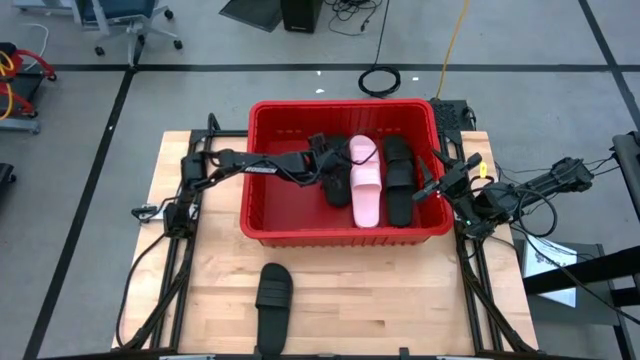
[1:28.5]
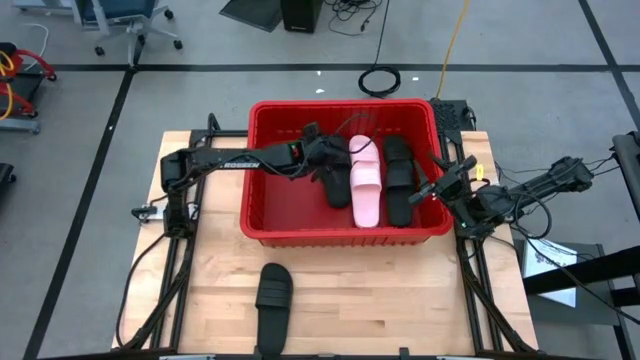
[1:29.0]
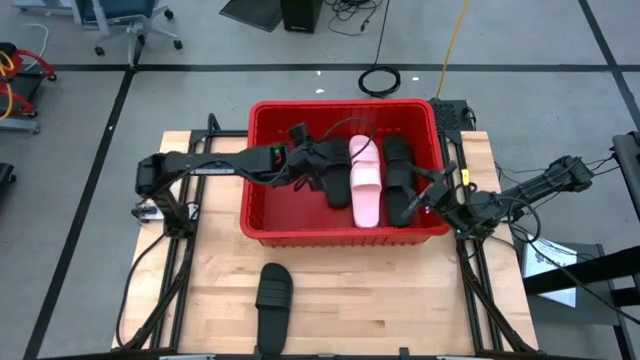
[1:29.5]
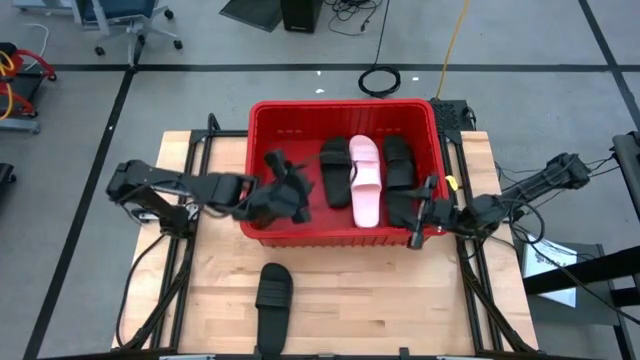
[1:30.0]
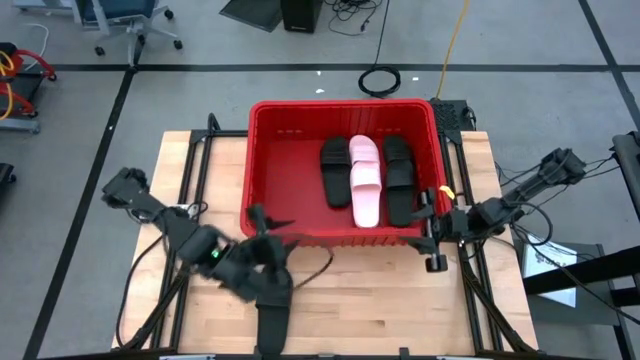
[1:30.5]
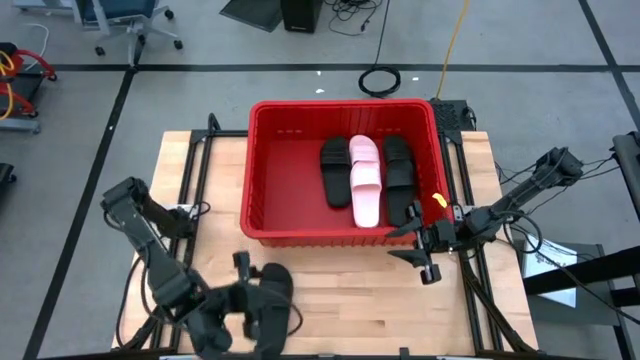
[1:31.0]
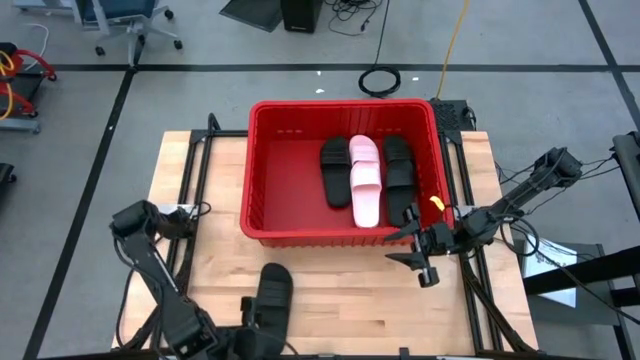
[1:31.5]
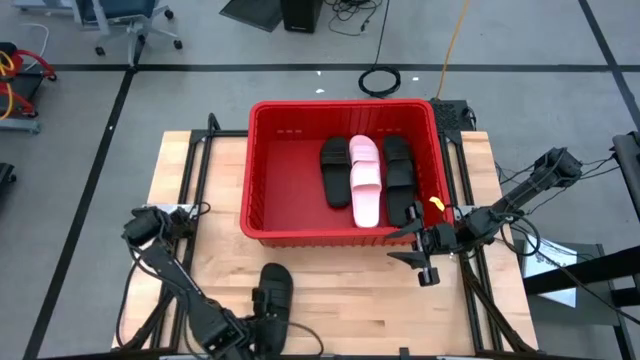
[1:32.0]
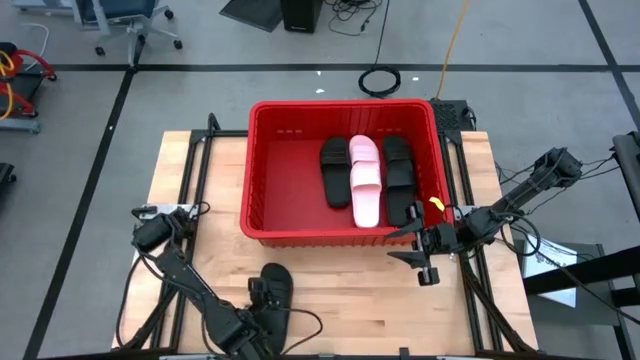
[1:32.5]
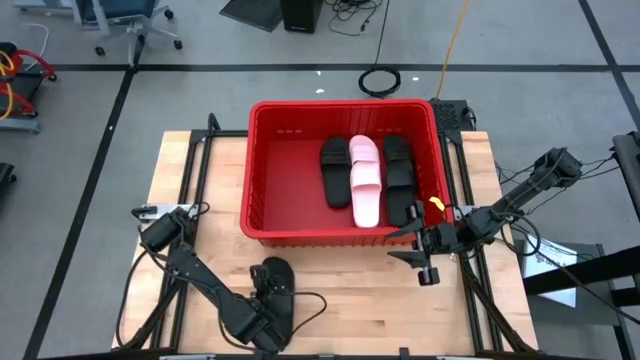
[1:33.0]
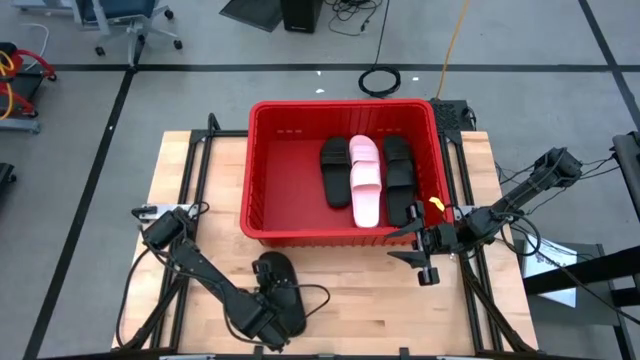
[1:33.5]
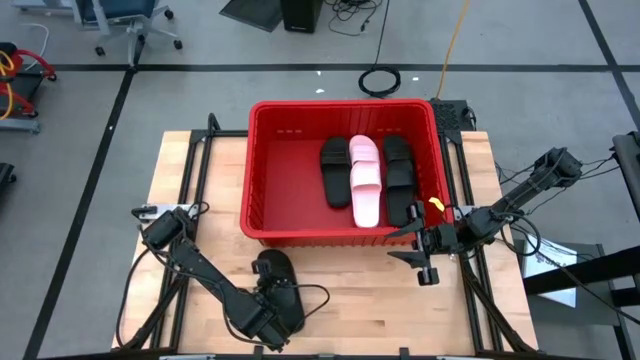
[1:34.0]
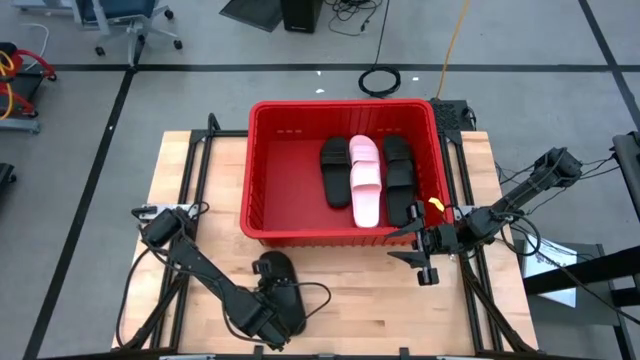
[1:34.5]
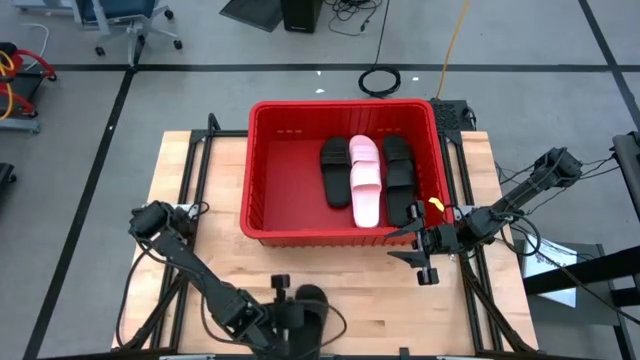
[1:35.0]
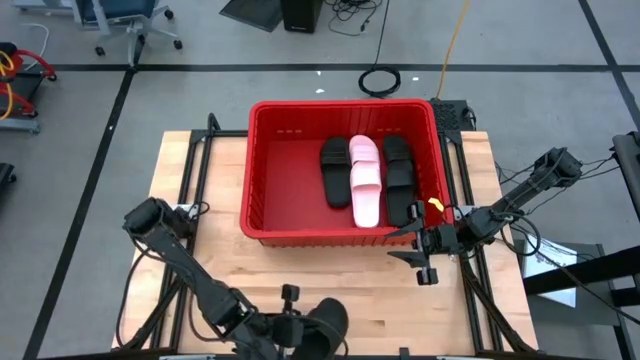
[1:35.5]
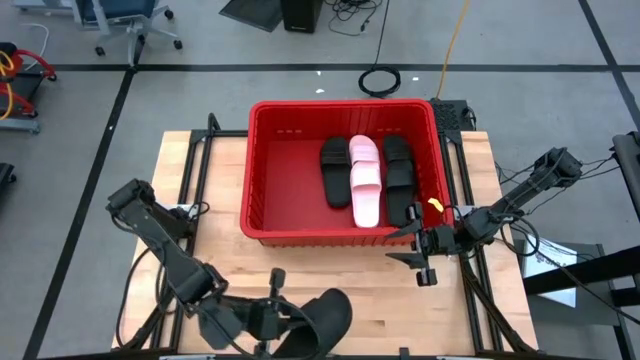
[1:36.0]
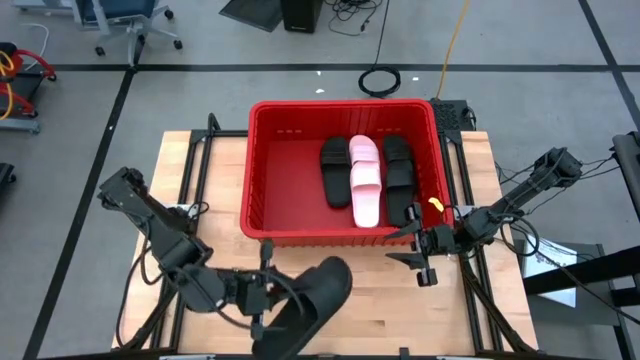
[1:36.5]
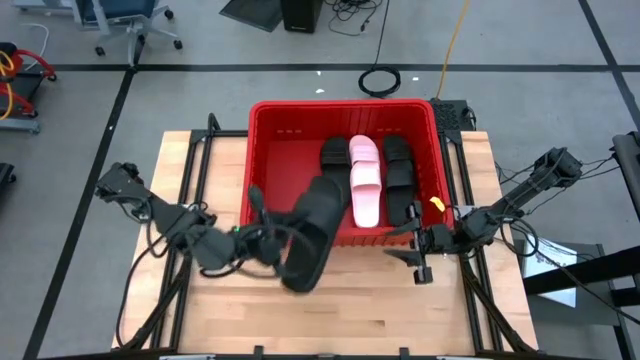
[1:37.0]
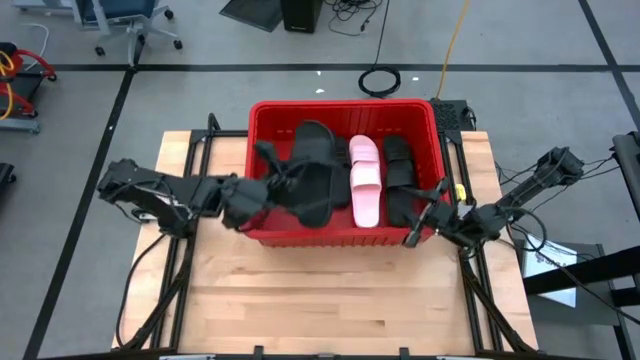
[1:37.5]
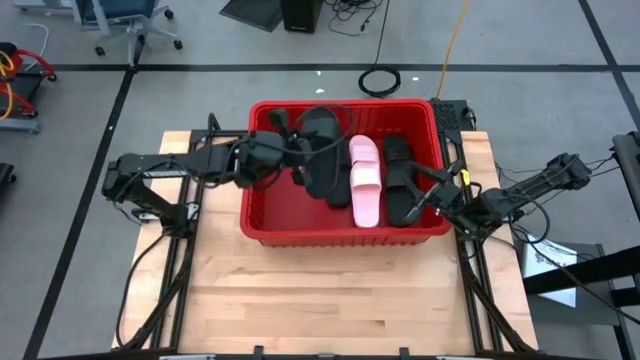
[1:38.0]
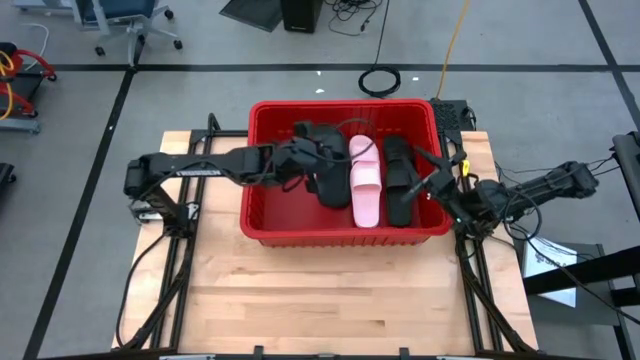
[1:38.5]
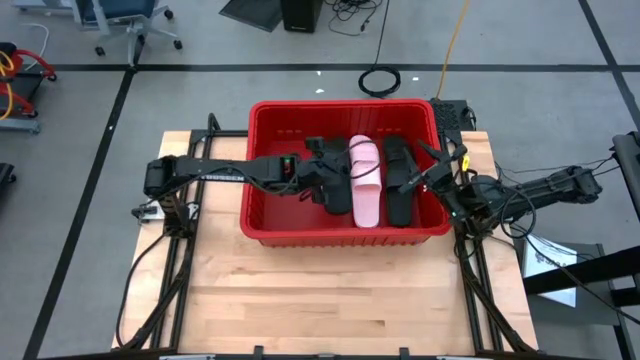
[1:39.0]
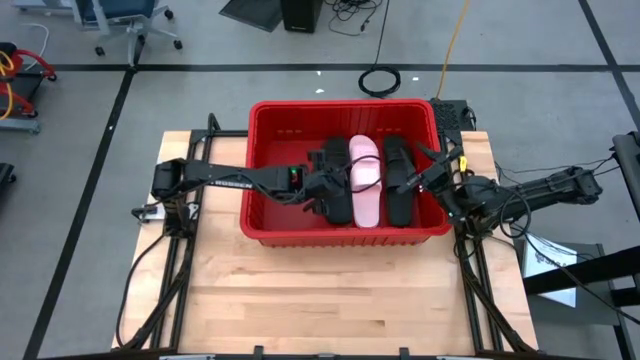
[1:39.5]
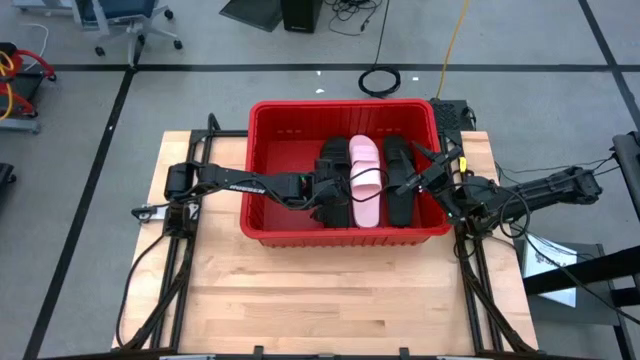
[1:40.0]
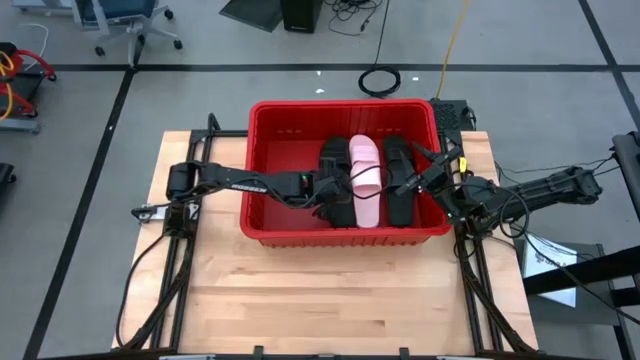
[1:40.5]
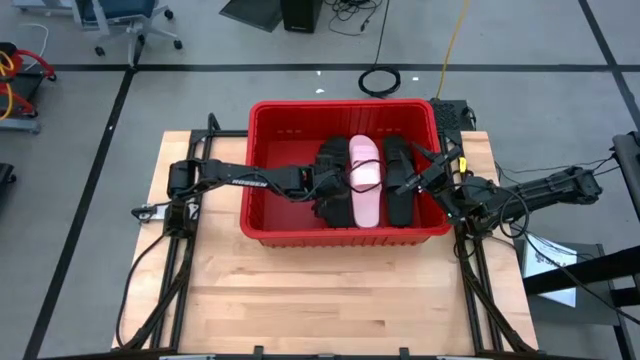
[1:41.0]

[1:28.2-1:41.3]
Task: Pick and place slides into bin
Put the black slide into the red organizer bin

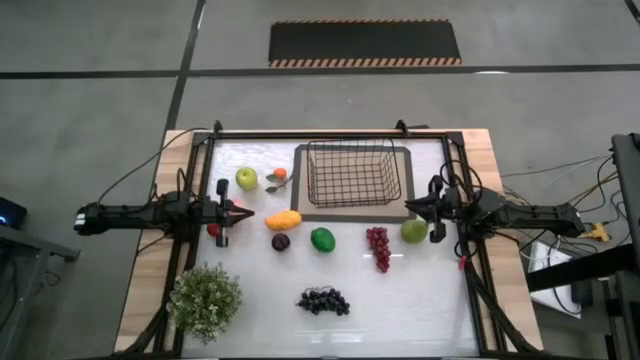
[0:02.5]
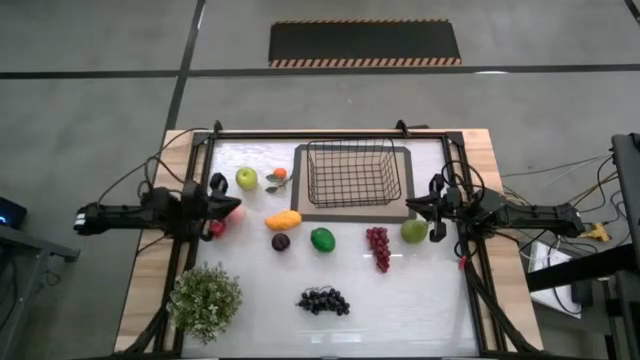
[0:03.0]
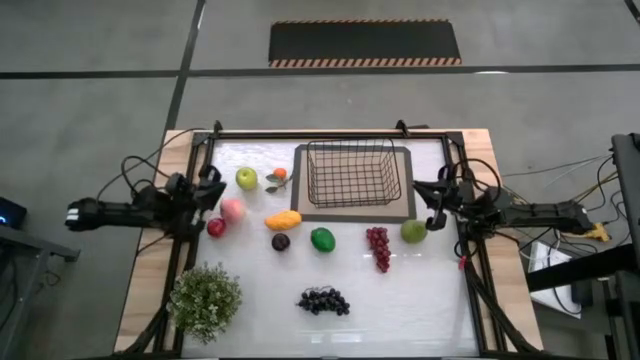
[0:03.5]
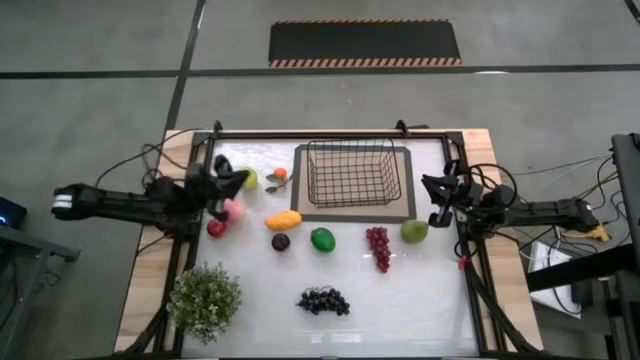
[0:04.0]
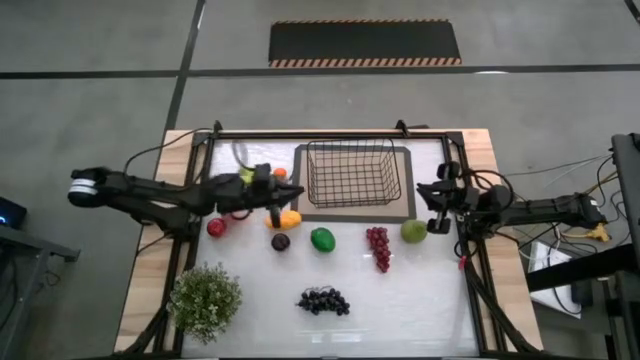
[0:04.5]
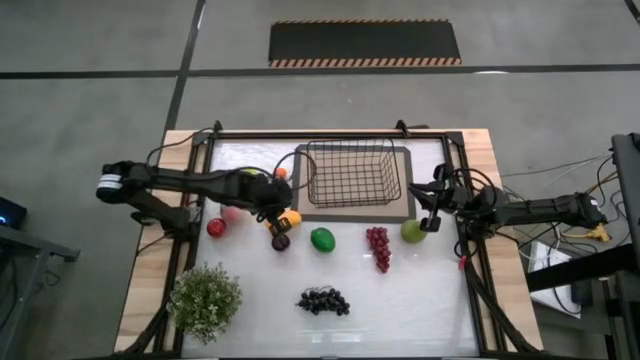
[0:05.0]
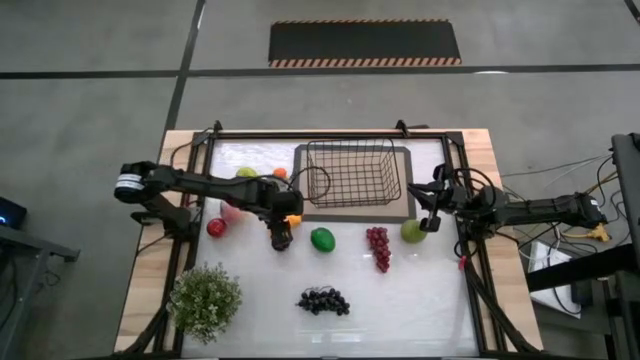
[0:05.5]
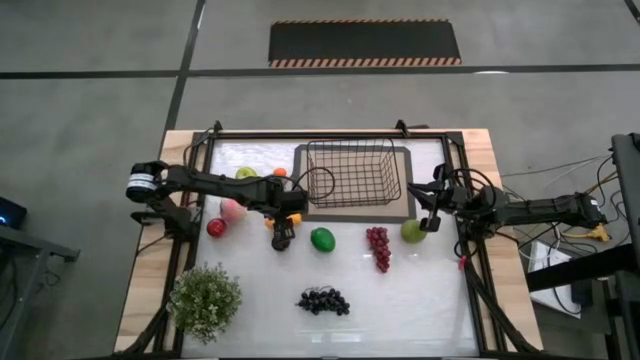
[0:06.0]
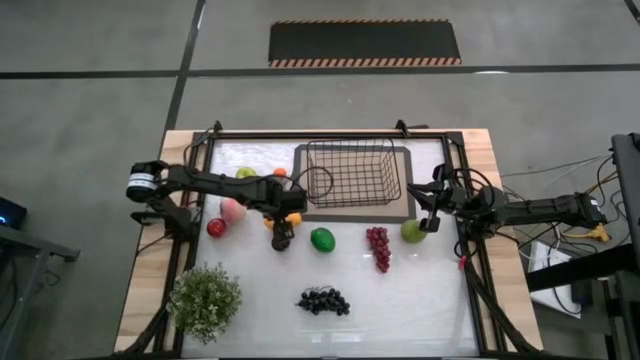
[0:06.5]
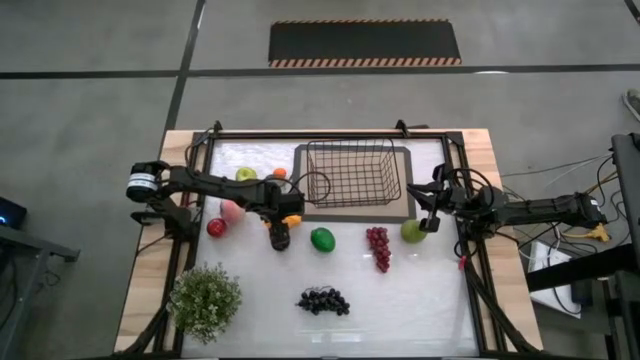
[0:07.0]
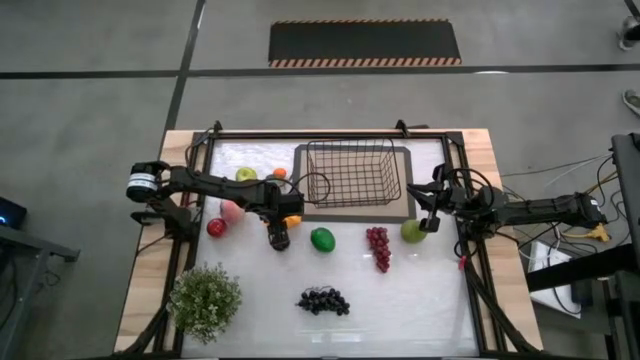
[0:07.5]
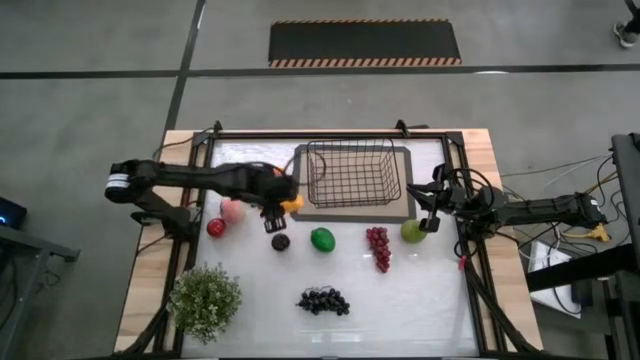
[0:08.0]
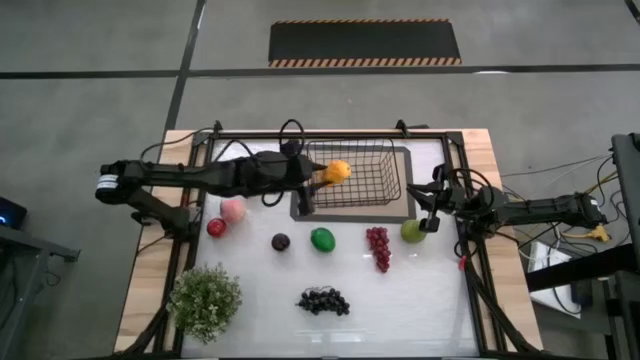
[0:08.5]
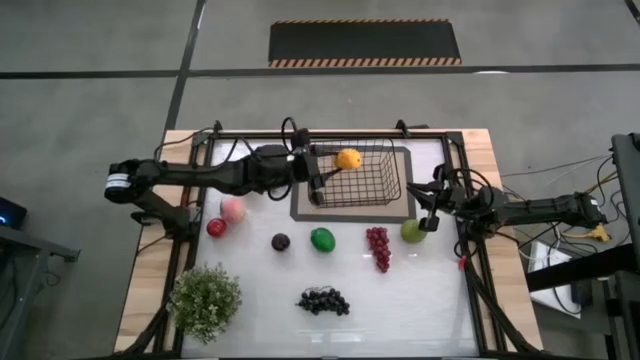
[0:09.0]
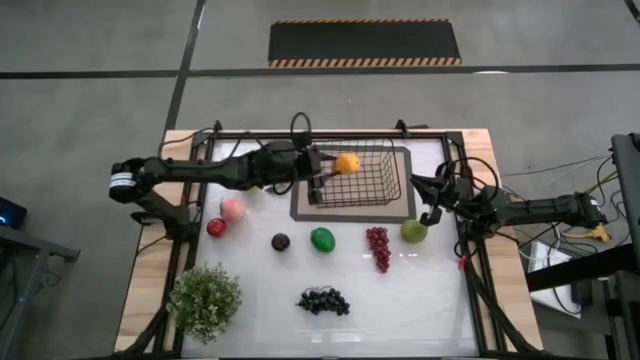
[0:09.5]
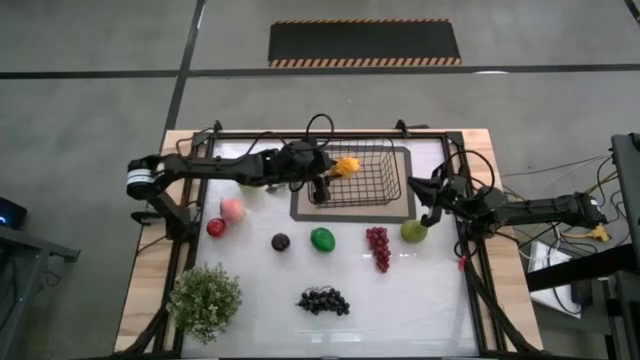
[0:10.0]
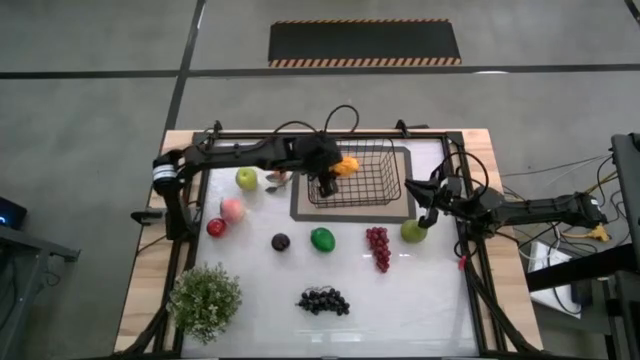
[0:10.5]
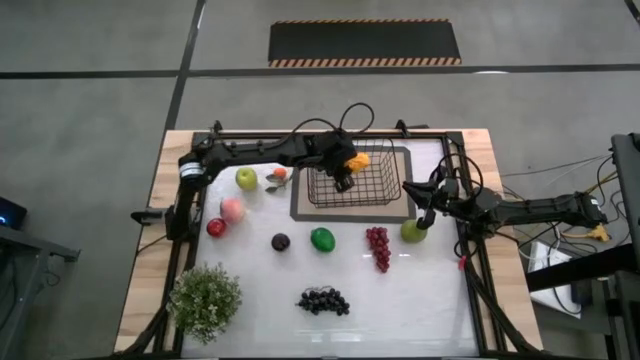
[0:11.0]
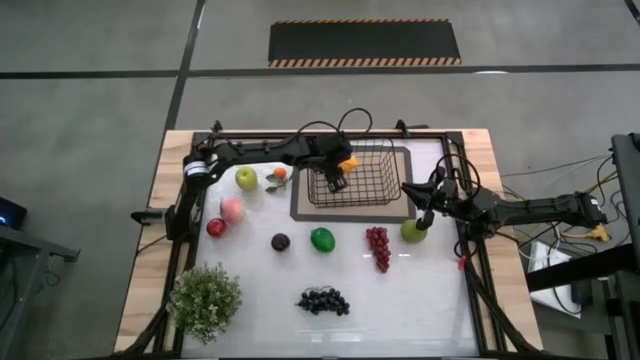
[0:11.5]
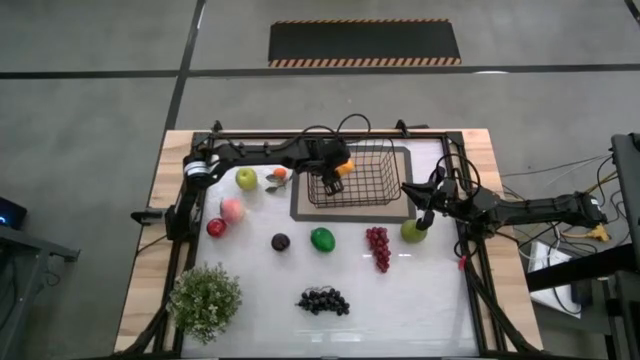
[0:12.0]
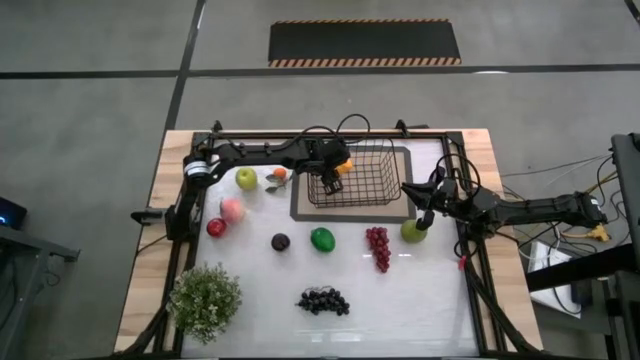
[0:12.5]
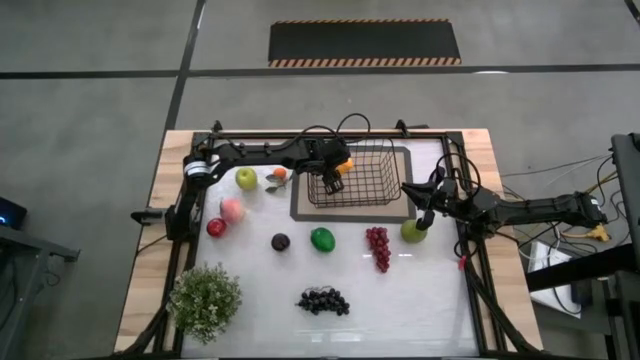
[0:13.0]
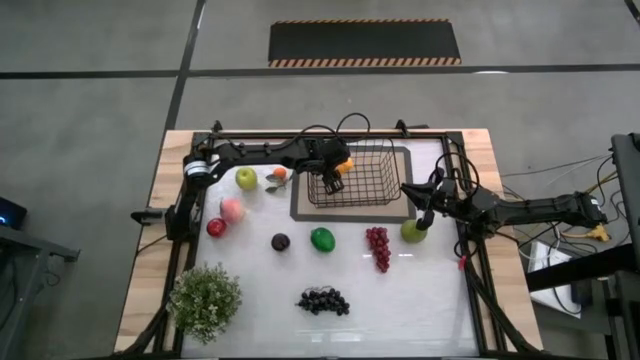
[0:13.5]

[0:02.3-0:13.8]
Task: Build produce basket
Put the yellow mango into the black wire basket
